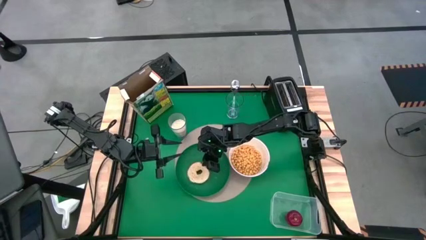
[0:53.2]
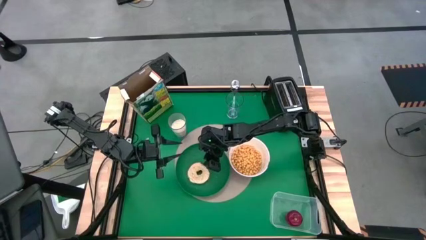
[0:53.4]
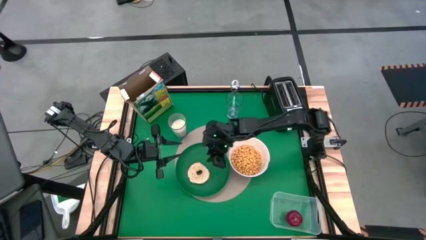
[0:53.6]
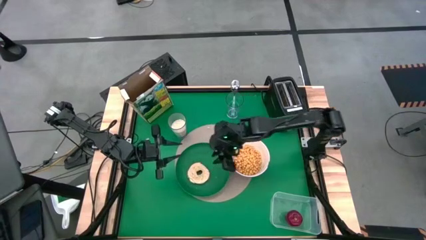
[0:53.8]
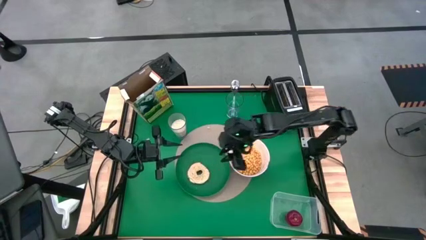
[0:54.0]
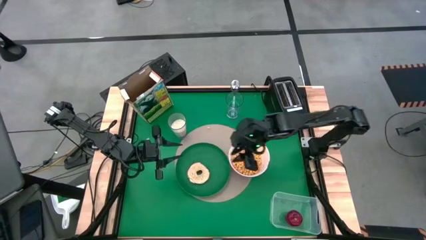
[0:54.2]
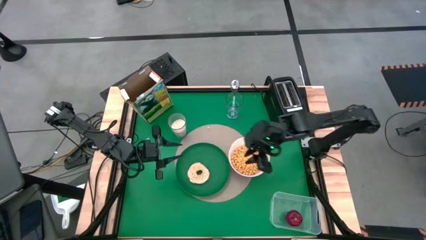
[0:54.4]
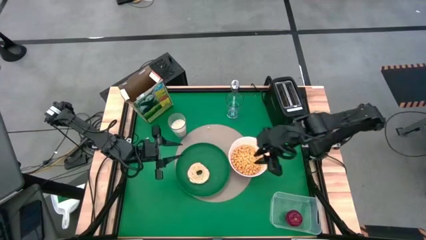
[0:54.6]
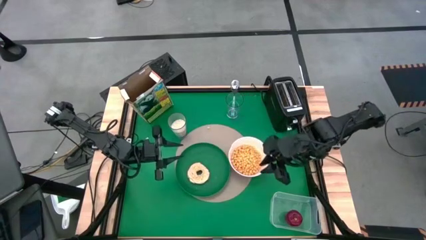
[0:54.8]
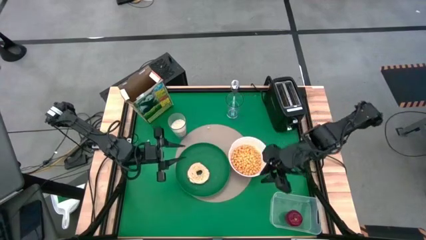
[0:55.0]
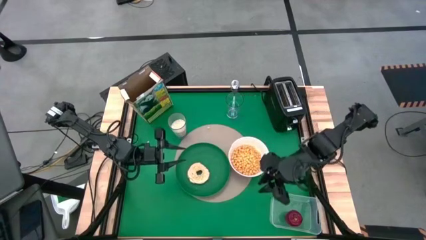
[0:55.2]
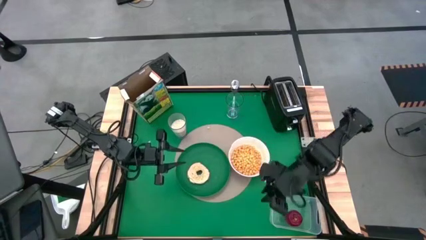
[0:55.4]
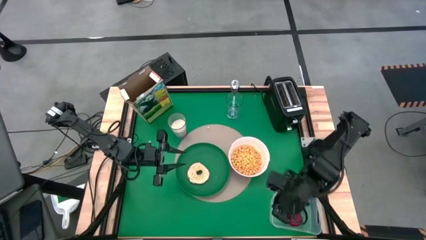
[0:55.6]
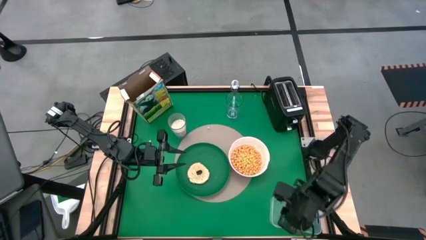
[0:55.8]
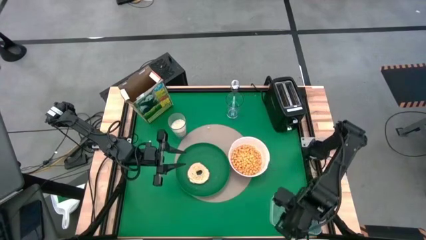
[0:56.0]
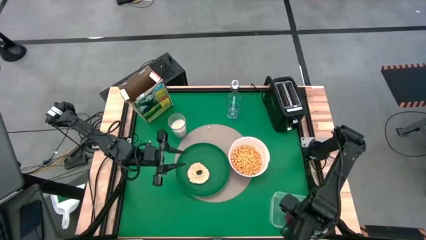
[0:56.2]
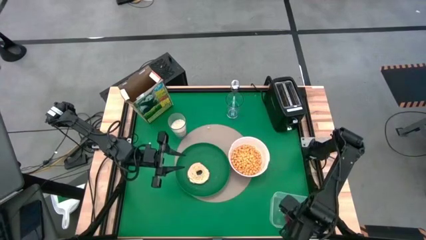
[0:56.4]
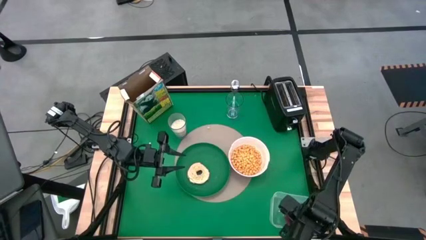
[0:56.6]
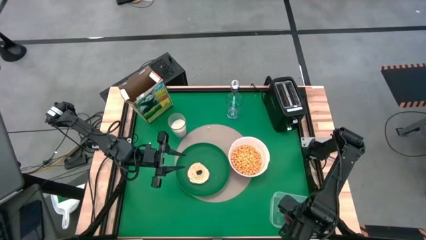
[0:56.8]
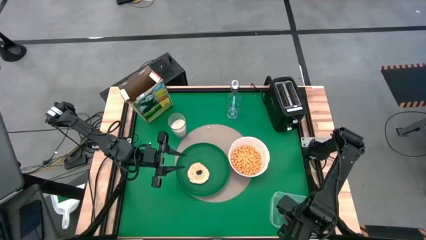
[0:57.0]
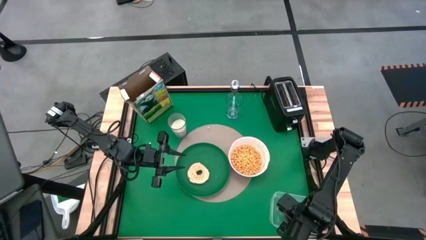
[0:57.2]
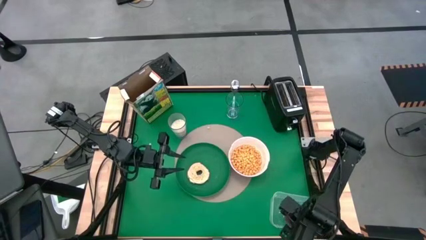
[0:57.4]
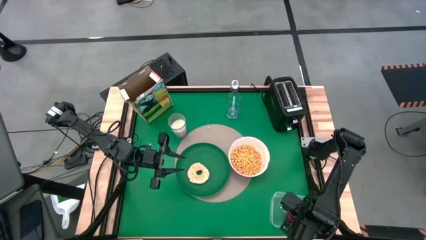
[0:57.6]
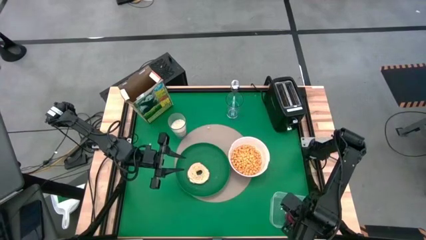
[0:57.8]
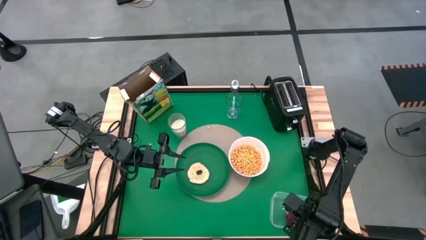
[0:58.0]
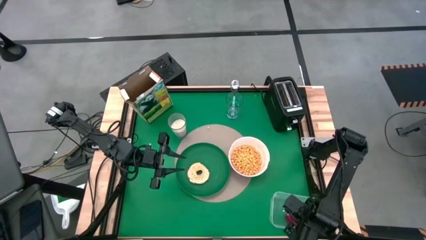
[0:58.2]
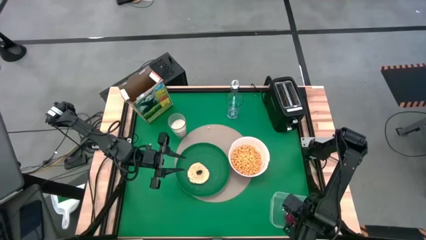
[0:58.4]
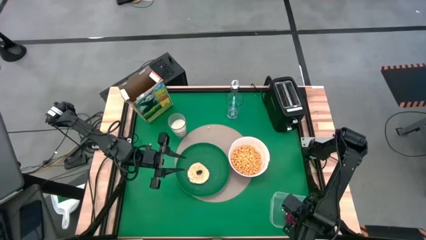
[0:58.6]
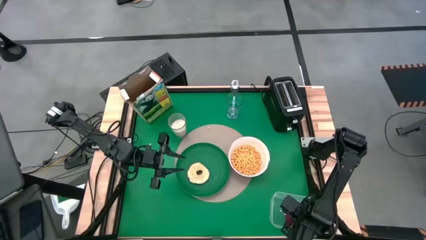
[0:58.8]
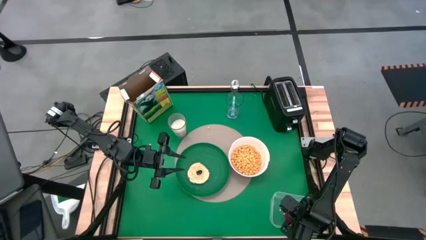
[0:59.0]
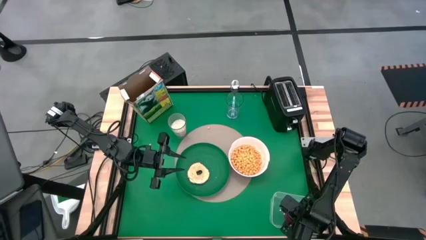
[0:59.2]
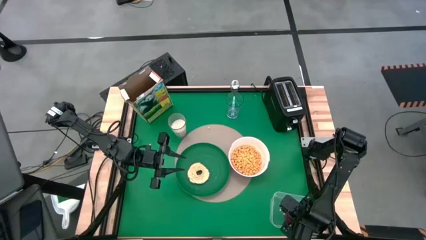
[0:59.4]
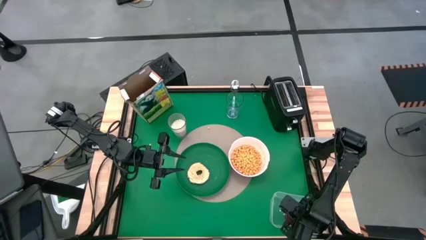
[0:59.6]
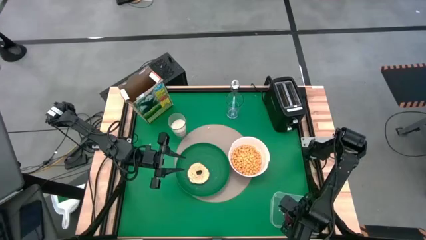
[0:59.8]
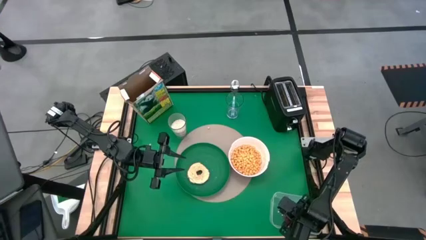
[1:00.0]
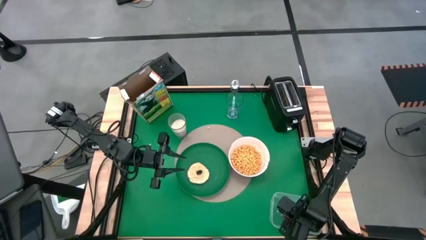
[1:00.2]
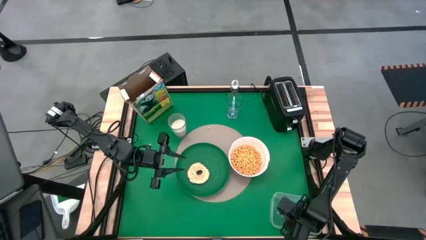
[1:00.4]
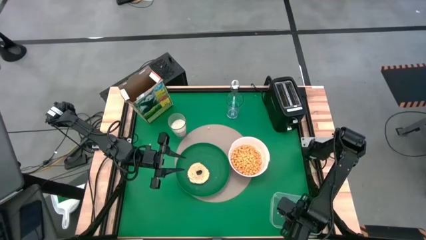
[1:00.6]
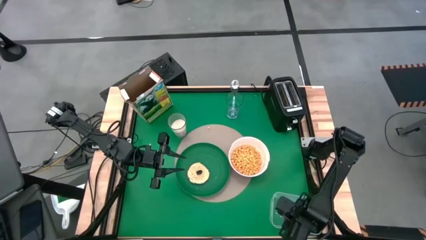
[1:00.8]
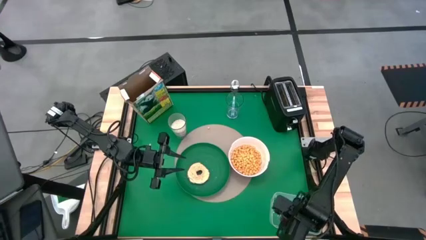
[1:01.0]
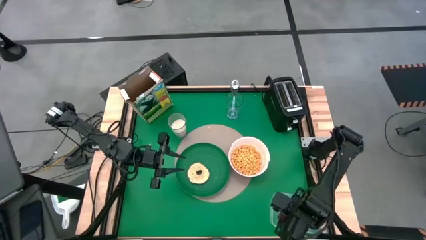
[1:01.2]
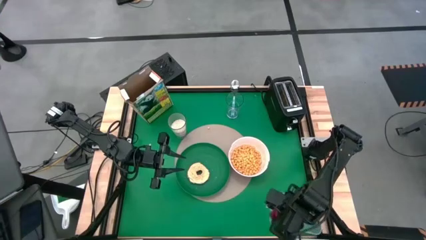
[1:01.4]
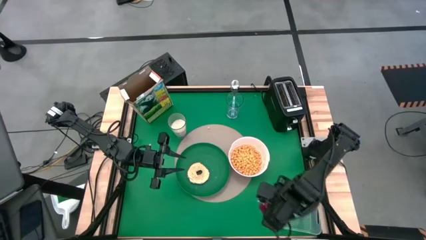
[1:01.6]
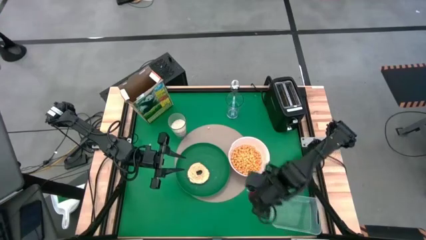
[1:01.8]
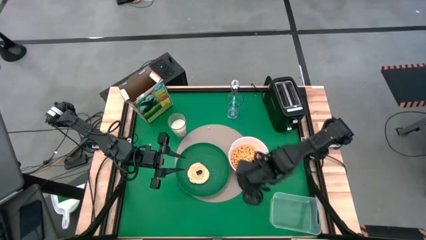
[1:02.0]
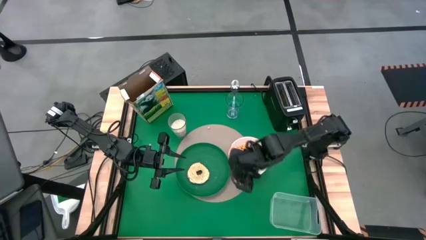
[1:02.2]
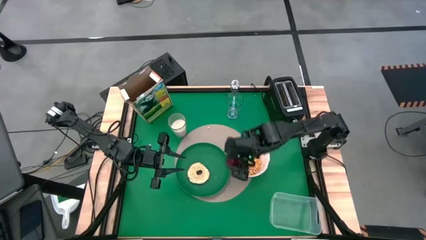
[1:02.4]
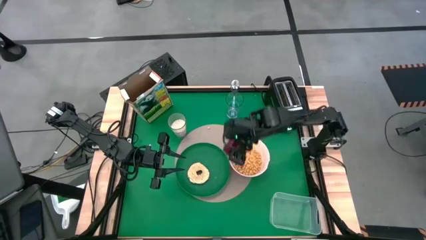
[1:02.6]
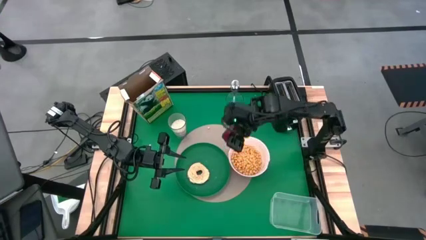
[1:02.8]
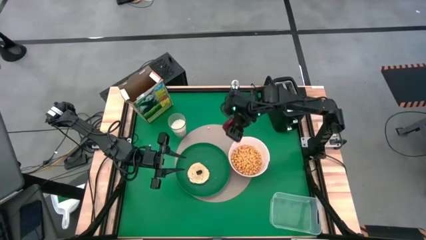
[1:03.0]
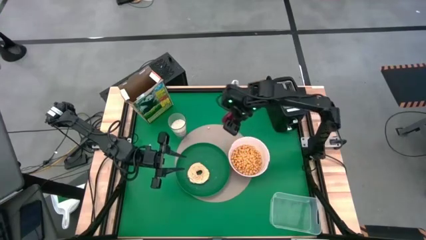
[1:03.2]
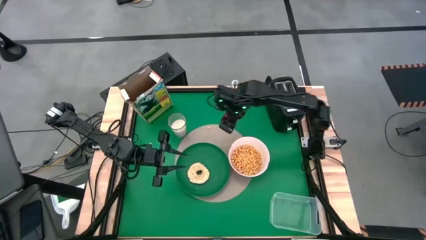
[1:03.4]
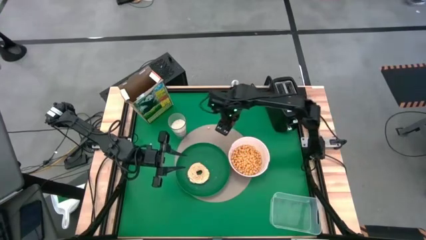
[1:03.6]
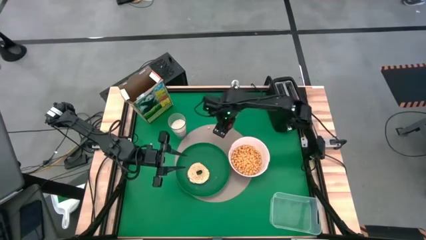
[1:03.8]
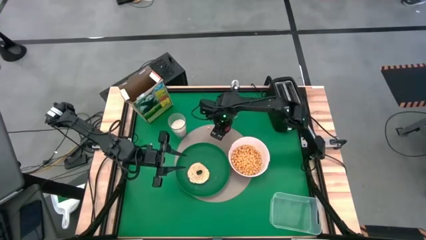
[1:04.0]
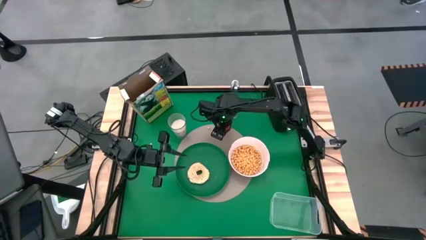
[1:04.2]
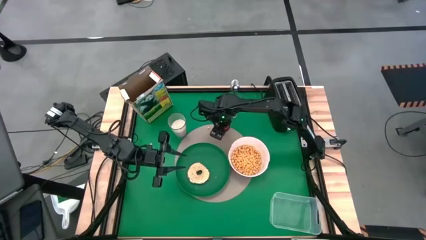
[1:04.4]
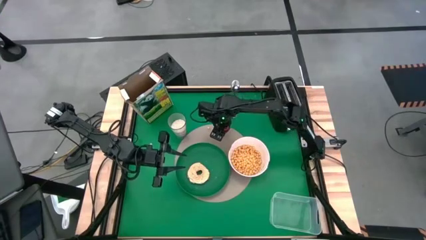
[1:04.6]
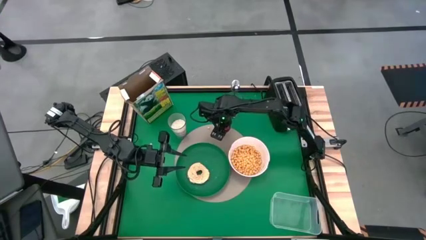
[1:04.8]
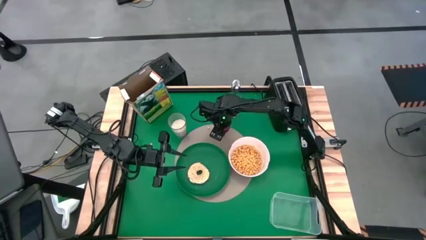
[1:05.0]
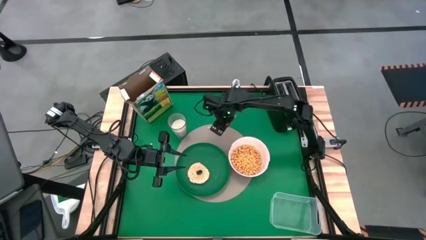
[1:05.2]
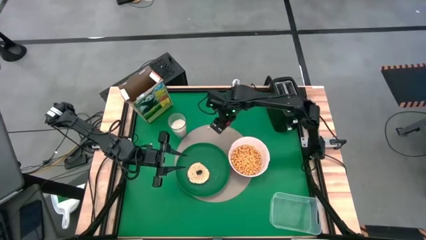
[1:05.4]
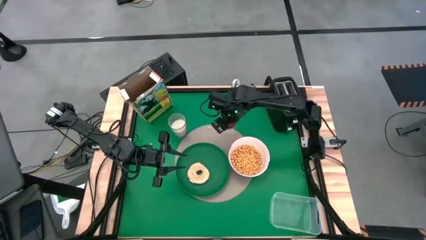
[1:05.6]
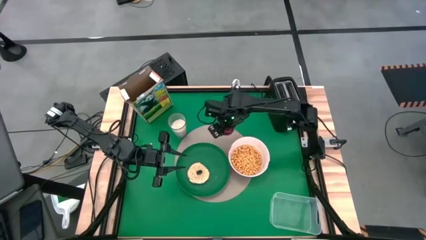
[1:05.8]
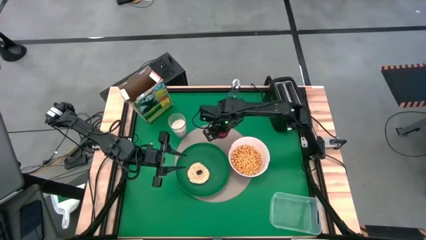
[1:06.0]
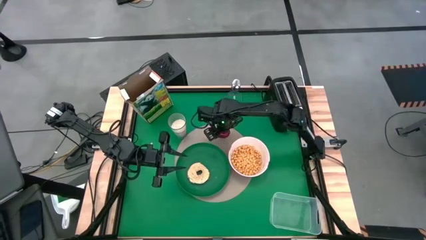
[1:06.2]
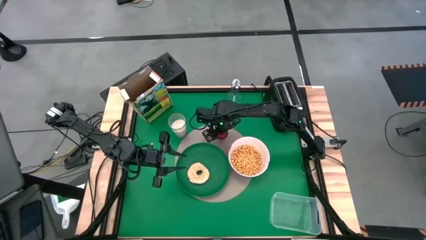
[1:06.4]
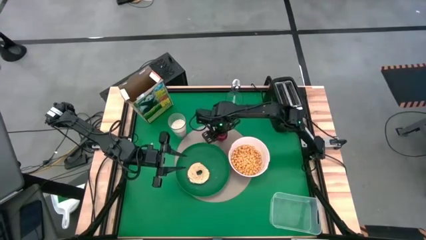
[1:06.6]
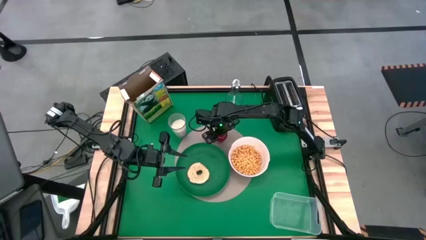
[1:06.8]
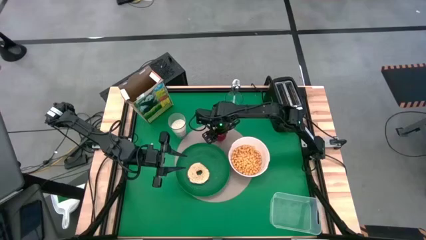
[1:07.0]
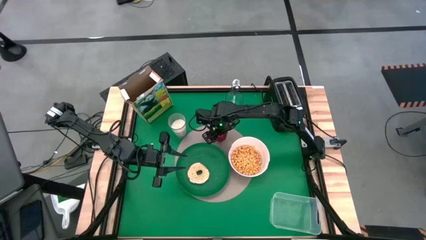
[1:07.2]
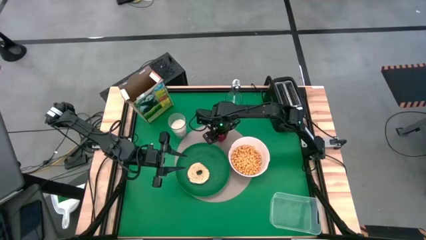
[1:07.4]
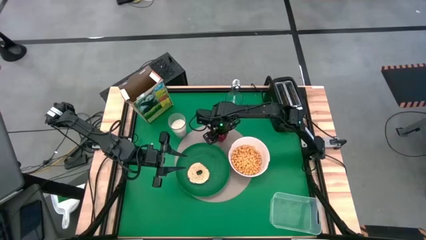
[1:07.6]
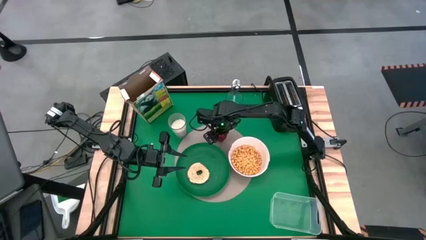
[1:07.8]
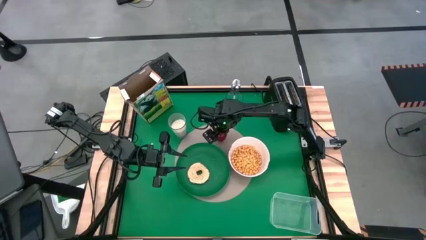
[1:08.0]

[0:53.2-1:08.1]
Task: Arrange a breakfast setting
Put the red apple on the brown placemat
